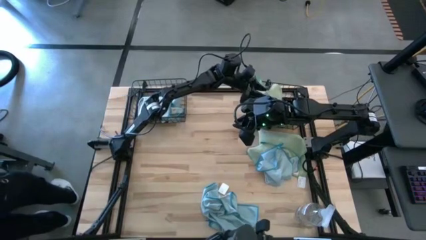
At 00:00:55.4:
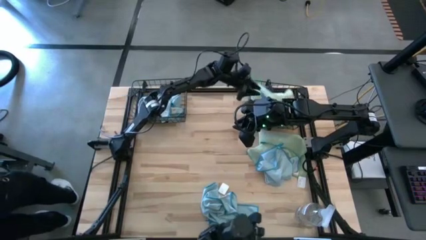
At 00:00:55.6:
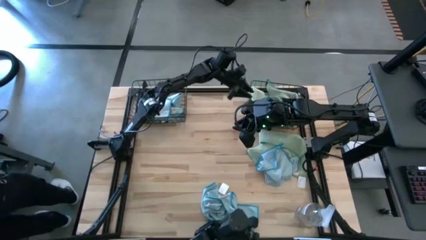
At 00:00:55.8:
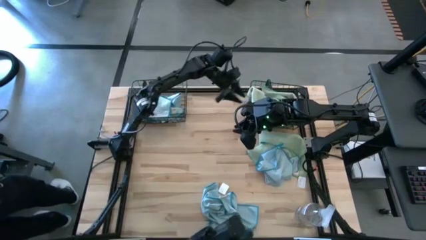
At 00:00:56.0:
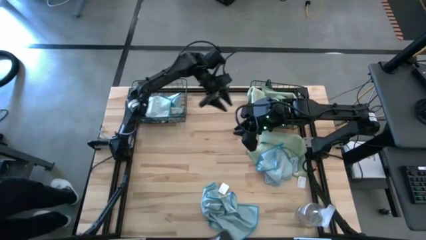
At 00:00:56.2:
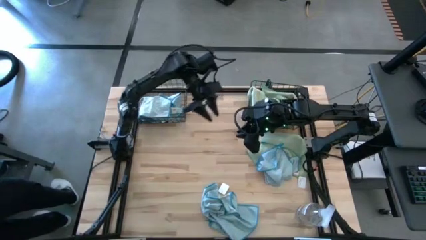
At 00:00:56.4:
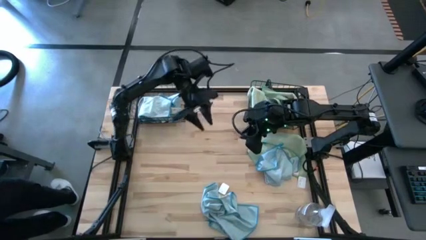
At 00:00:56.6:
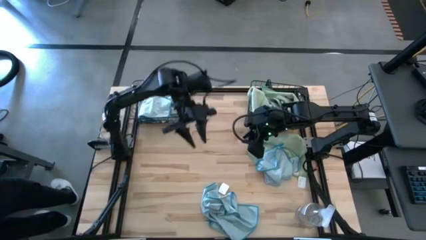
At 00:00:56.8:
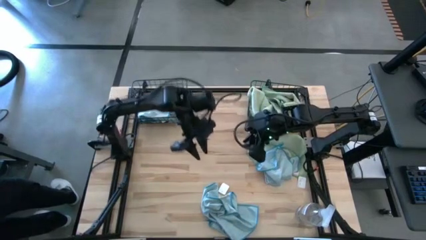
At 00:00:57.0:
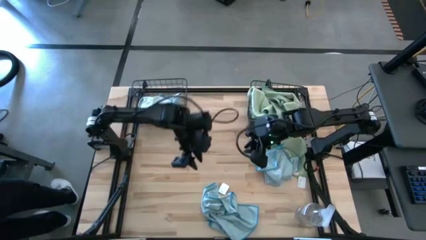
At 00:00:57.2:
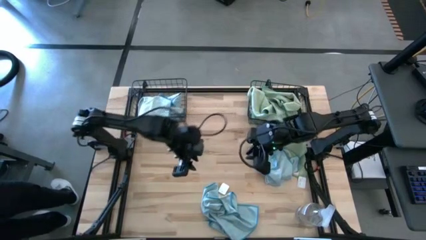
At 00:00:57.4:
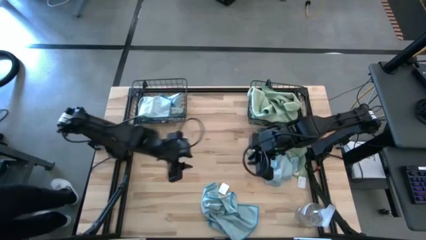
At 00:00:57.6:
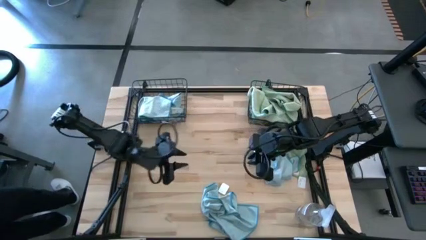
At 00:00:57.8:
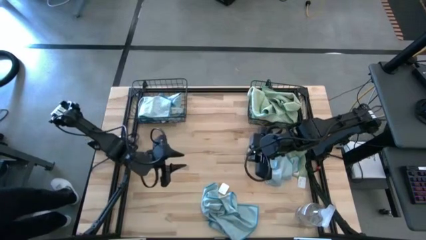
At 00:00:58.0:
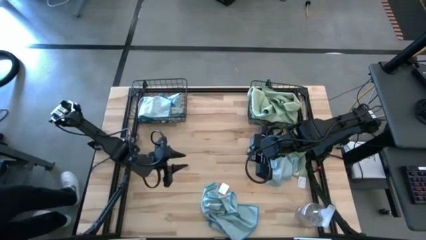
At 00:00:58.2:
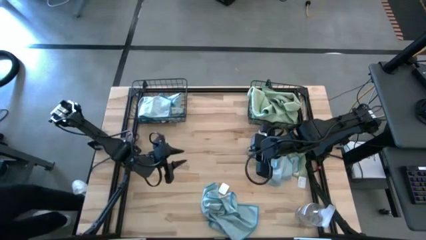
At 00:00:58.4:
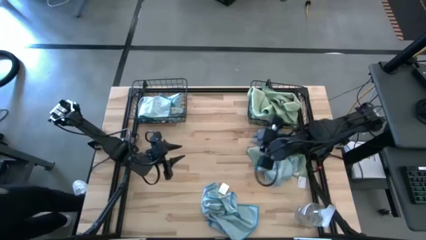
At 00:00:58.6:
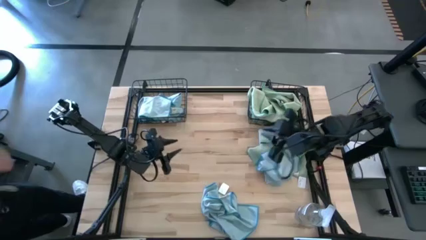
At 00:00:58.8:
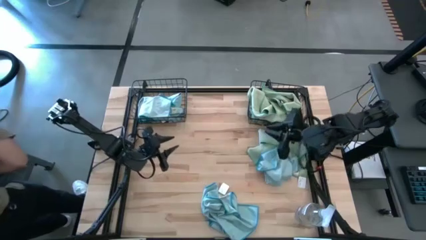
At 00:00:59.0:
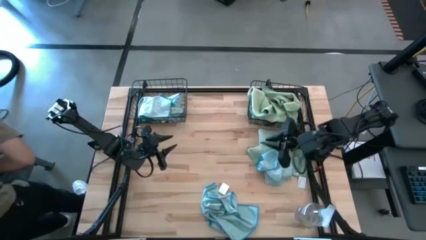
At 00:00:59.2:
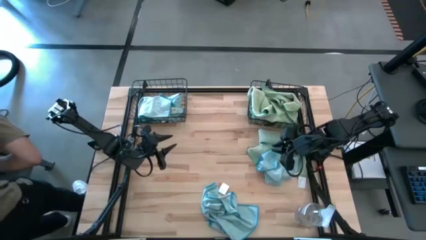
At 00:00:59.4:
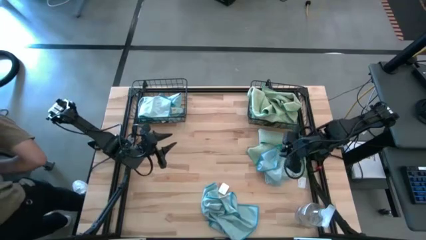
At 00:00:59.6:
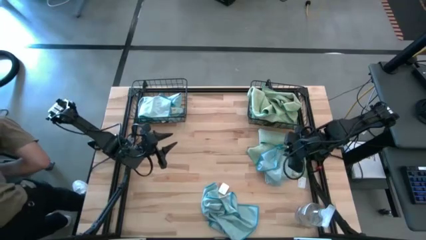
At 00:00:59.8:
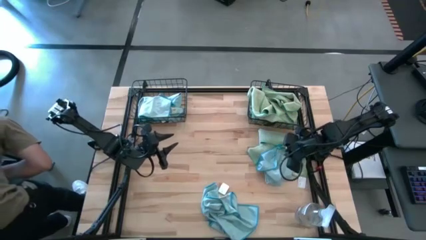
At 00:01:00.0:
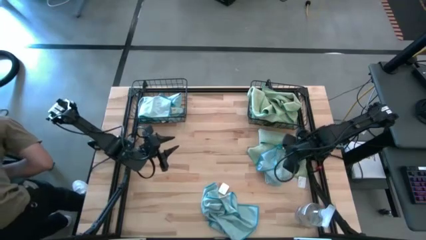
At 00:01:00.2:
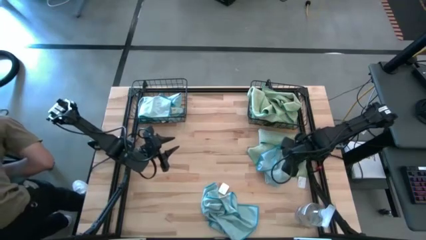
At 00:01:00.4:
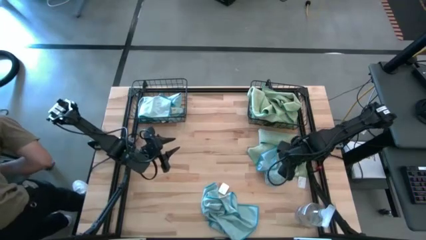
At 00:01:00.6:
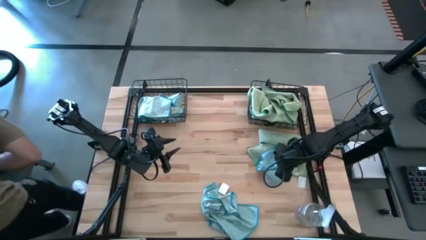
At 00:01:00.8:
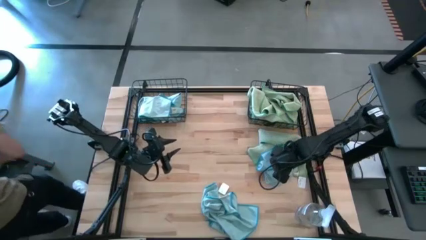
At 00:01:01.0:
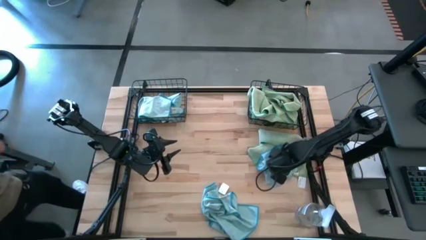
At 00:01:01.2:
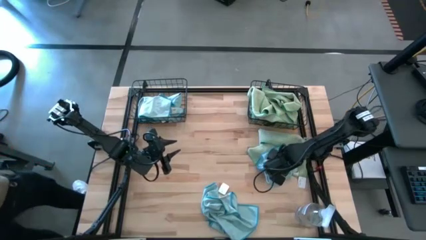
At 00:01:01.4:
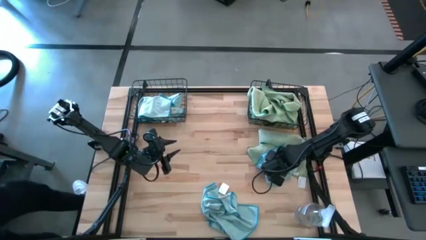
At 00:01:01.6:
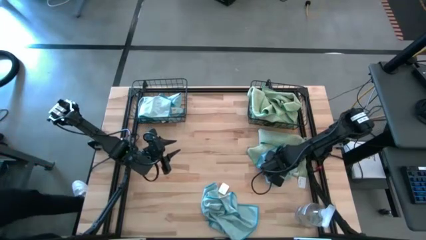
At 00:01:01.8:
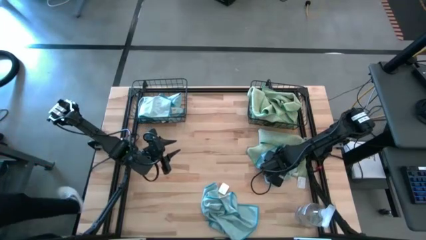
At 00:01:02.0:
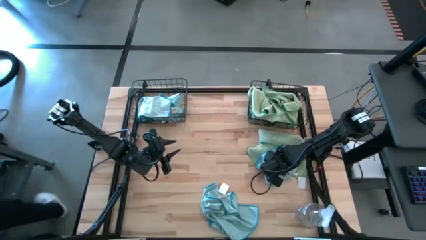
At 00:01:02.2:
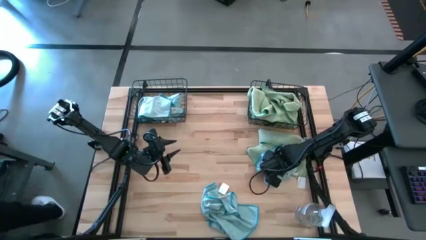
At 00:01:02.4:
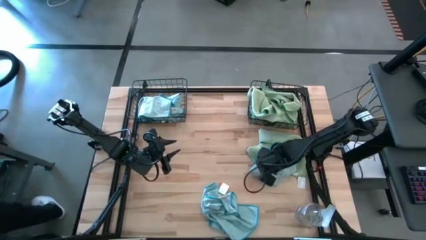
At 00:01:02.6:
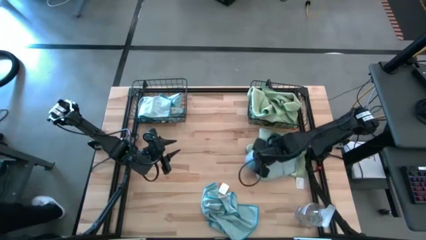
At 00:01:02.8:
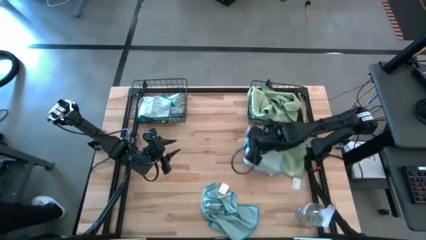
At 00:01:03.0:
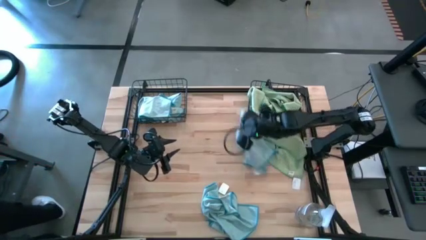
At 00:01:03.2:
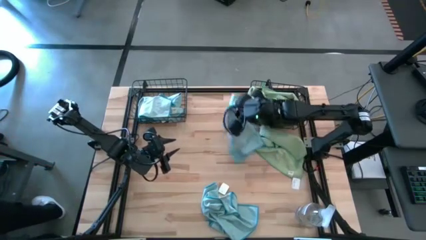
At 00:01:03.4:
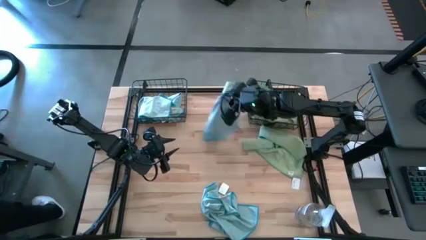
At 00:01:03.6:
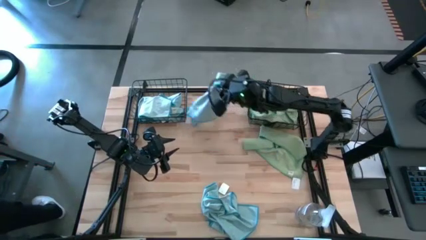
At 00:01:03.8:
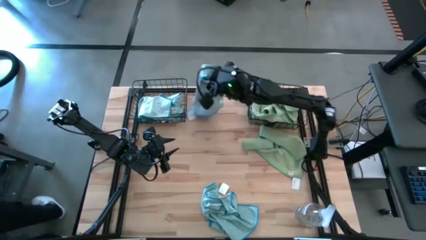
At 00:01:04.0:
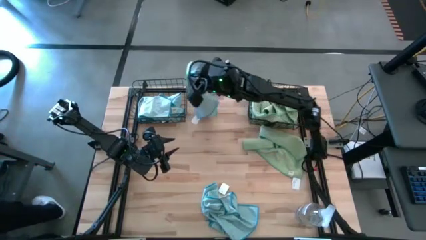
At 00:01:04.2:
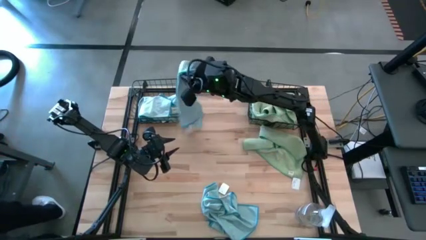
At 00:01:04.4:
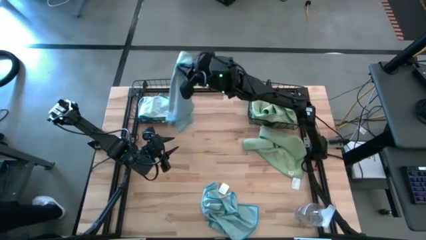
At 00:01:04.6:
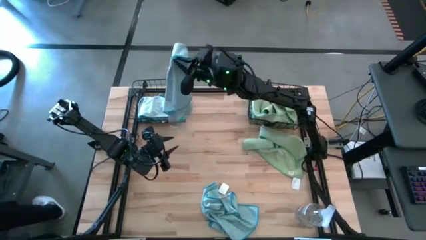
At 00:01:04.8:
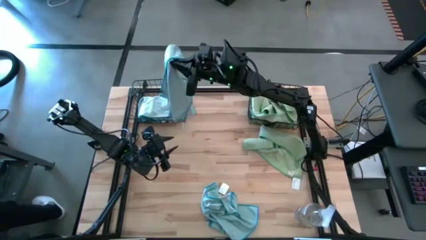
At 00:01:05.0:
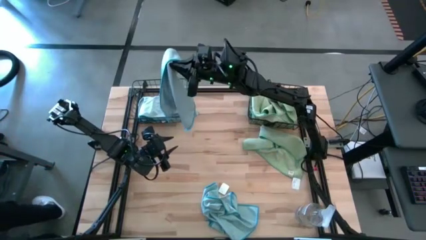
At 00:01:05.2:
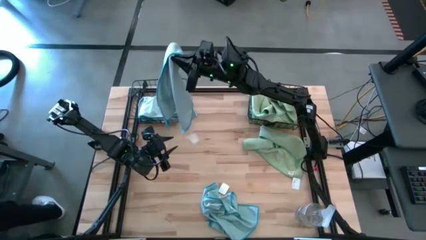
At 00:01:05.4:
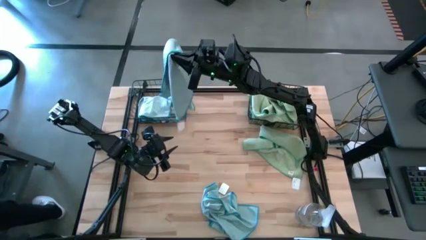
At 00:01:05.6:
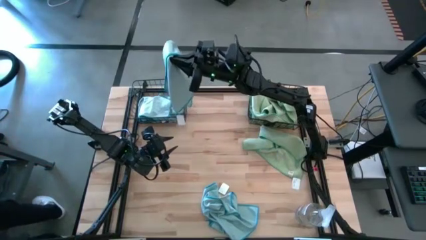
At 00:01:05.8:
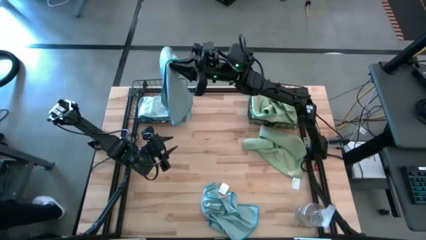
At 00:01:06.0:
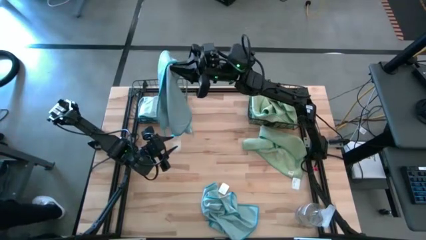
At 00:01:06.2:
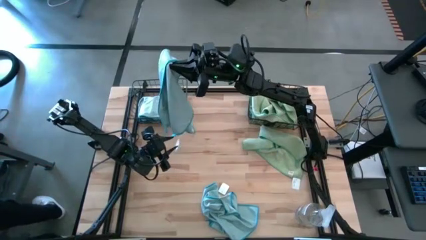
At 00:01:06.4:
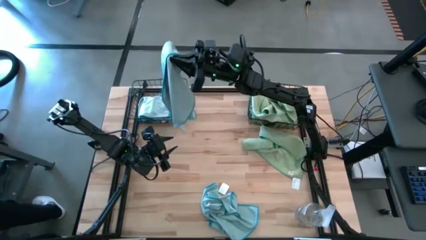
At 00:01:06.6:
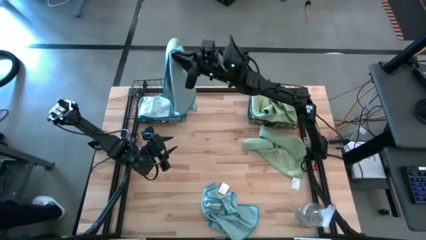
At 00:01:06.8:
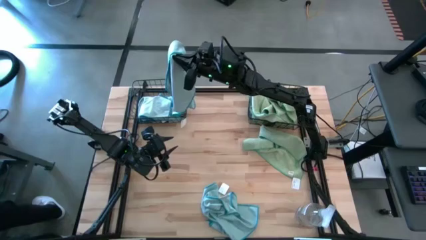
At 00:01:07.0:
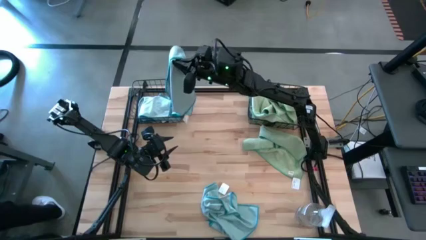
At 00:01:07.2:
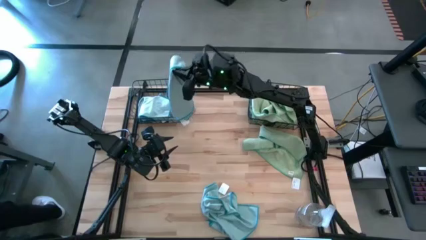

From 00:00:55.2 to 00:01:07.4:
Task: Sort microfiber towel by color & place in baskets
Put the blue microfiber towel into the left wire basket

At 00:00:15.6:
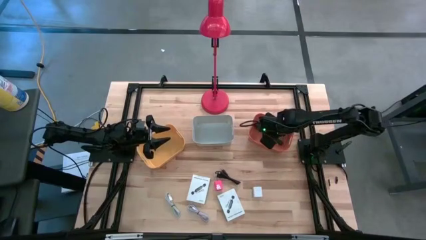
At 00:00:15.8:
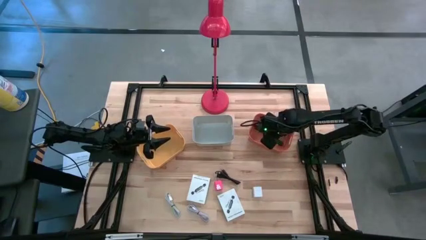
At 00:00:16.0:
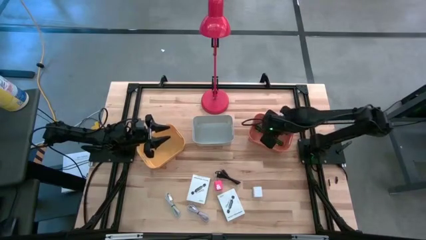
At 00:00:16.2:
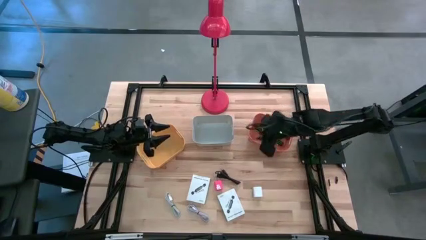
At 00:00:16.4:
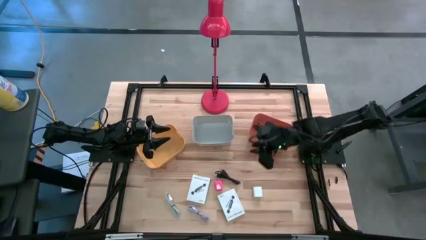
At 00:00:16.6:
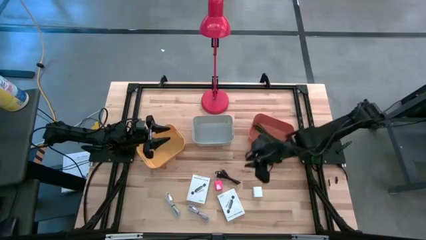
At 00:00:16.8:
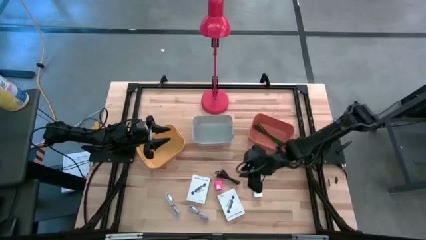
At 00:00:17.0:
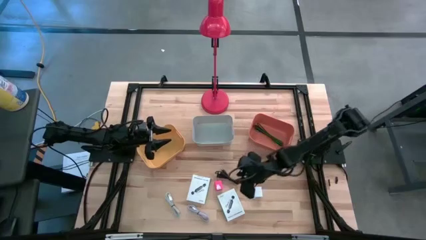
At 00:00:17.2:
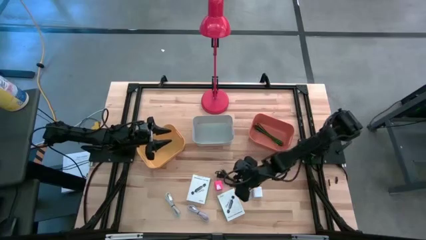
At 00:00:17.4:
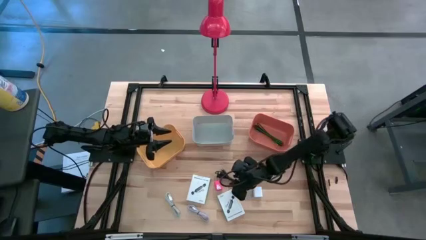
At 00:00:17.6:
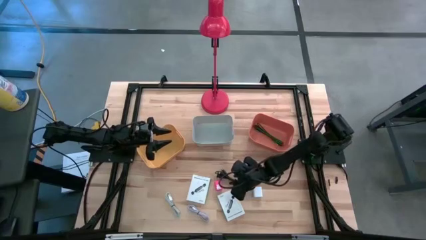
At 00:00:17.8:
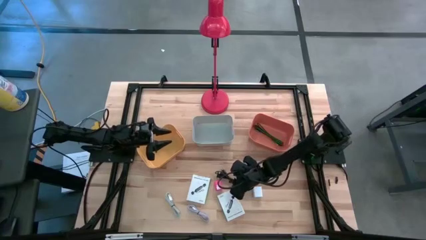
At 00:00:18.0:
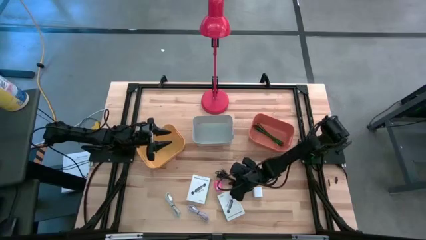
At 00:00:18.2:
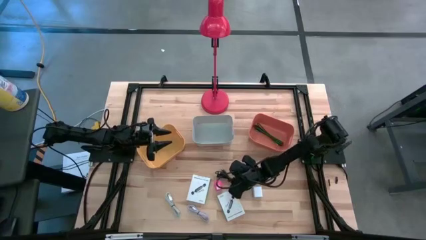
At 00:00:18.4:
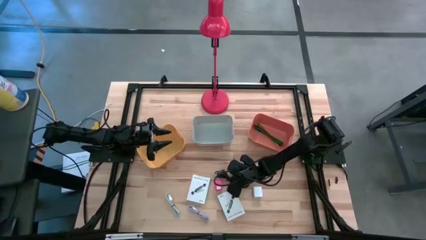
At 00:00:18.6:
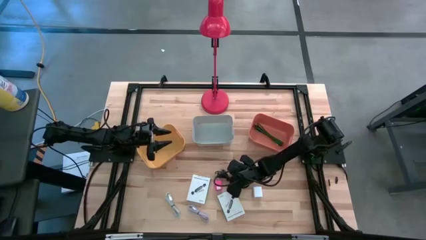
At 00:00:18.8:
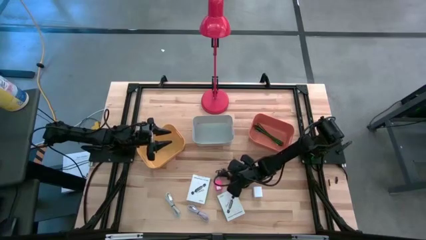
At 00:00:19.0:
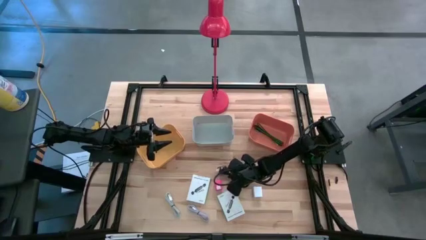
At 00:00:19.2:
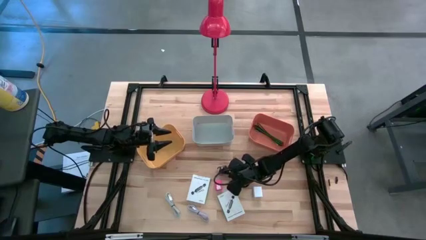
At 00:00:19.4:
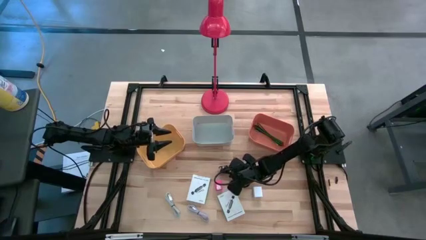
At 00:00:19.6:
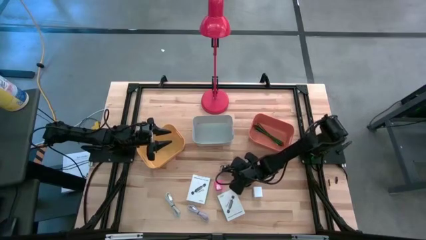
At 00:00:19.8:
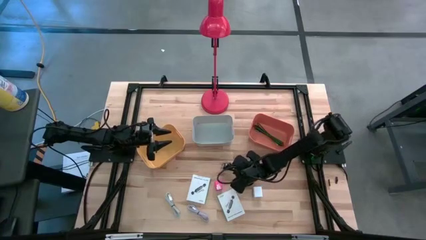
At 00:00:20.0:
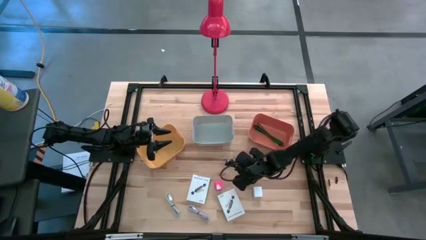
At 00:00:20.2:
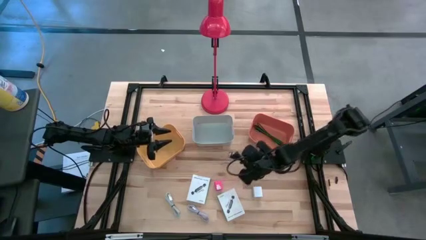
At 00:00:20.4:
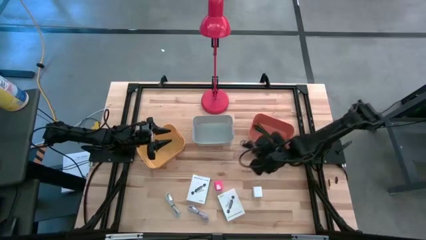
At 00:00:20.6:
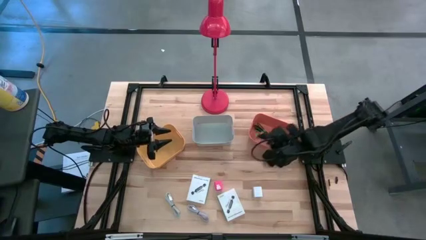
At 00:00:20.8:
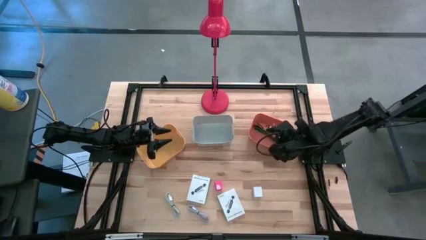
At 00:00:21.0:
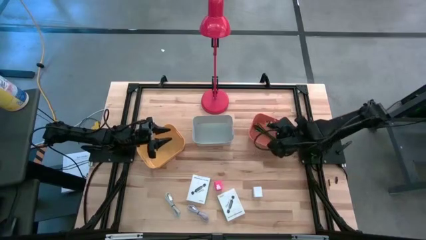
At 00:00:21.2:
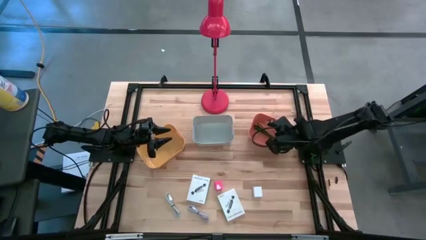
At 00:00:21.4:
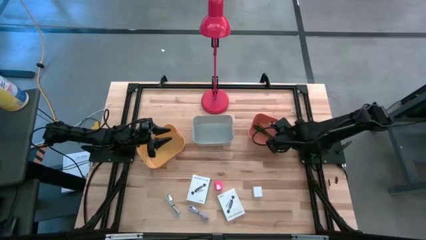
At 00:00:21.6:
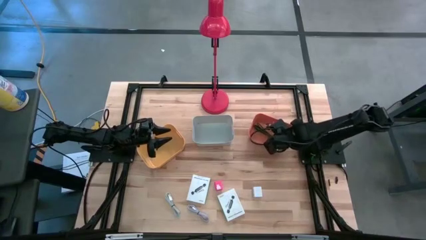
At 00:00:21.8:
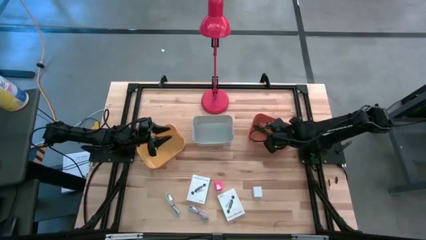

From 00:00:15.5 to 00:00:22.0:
Task: Pick and place items into bin
Put the black charger cable into the orange bin
